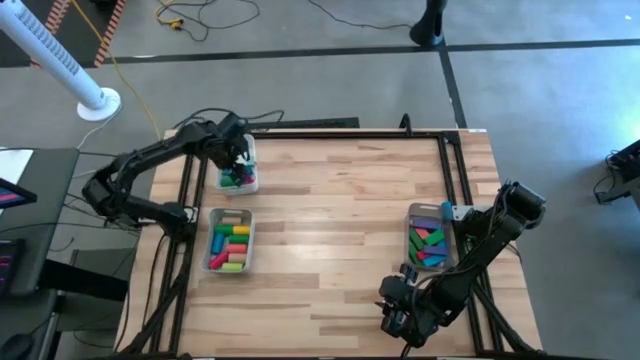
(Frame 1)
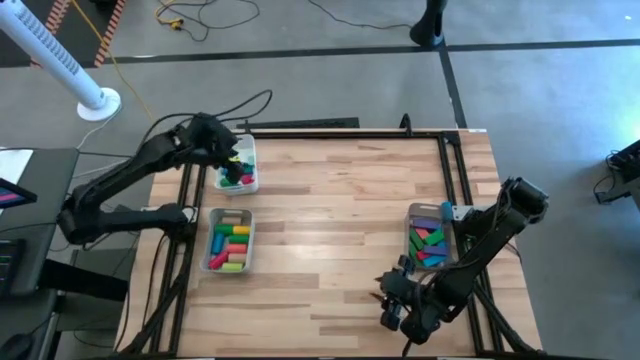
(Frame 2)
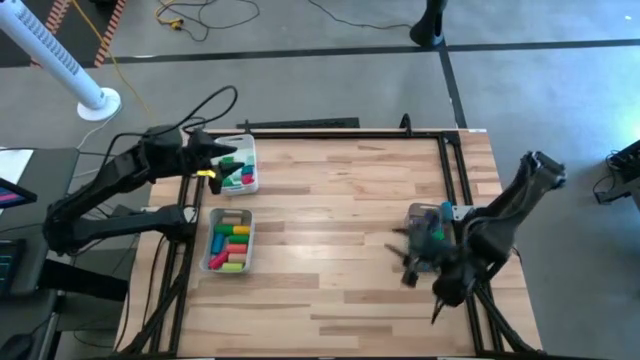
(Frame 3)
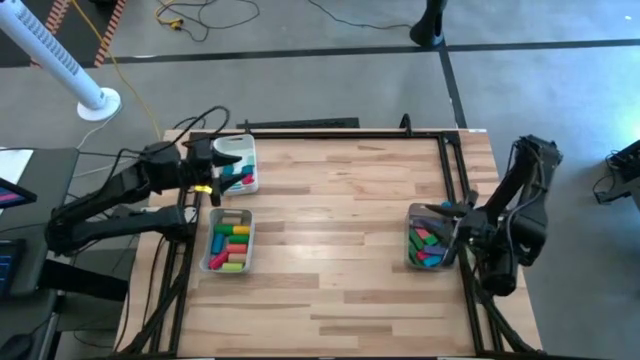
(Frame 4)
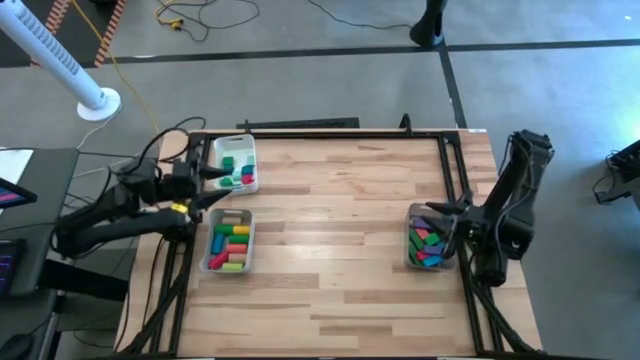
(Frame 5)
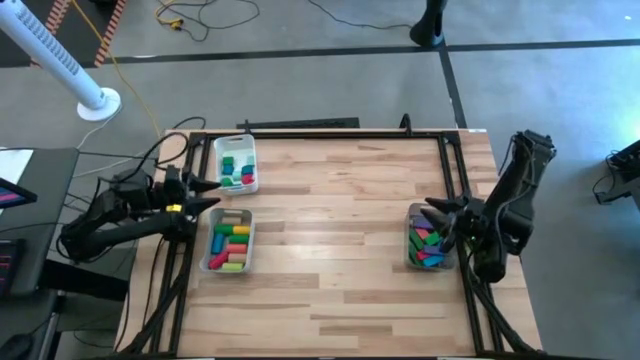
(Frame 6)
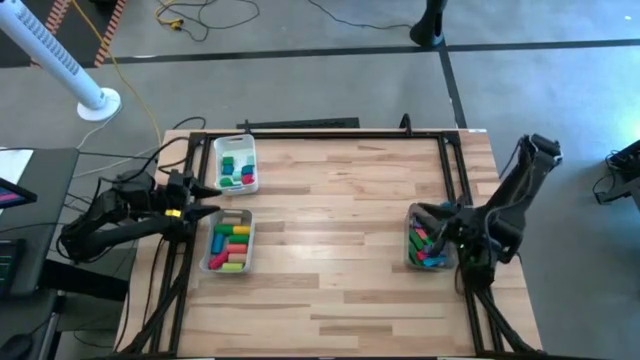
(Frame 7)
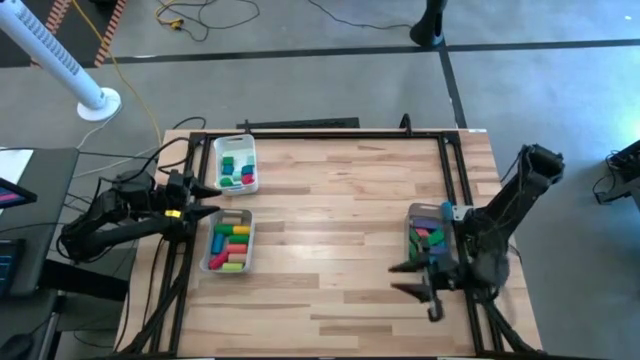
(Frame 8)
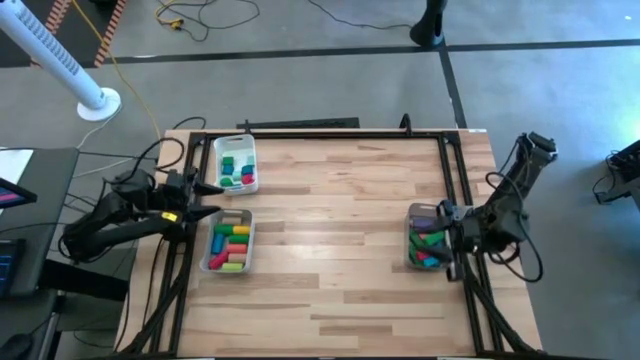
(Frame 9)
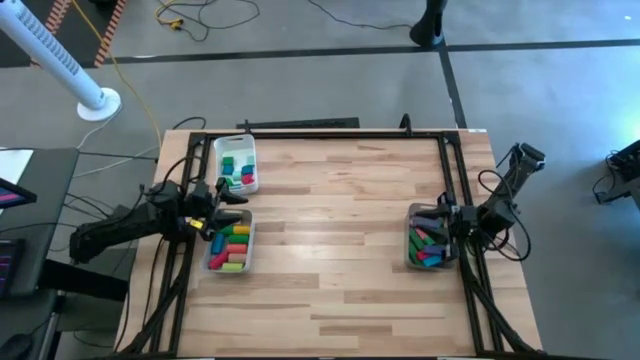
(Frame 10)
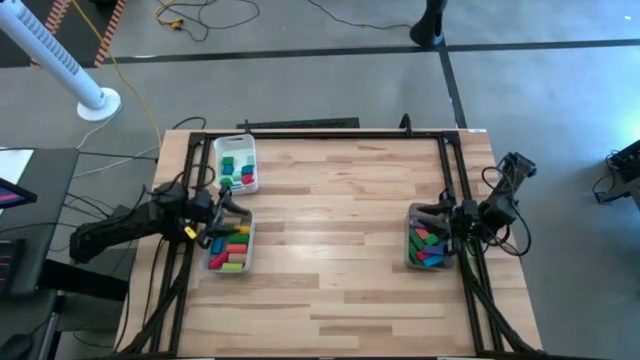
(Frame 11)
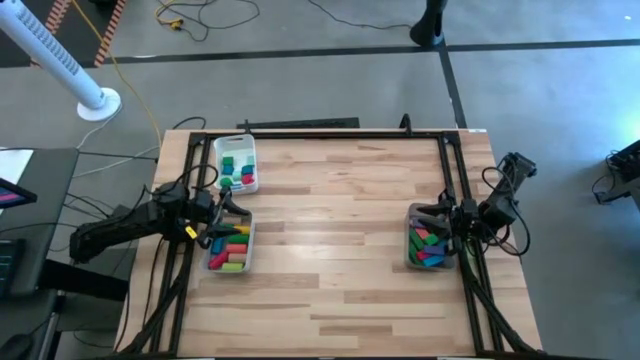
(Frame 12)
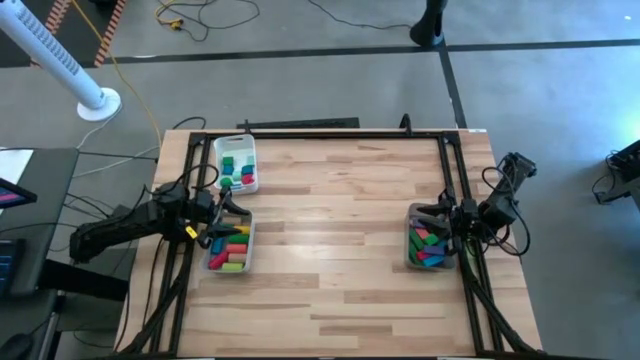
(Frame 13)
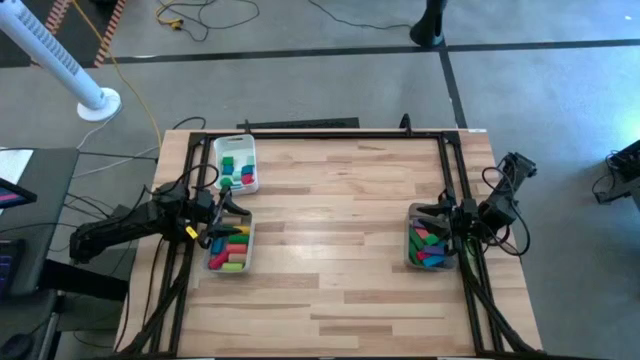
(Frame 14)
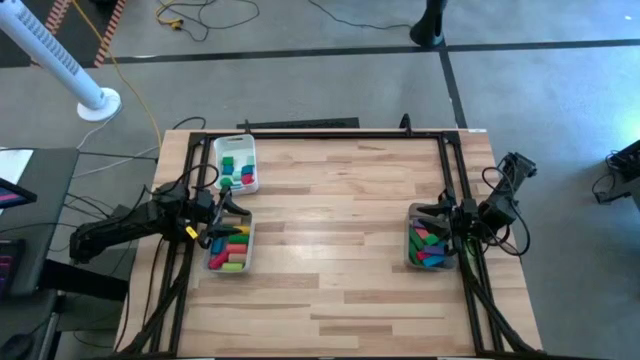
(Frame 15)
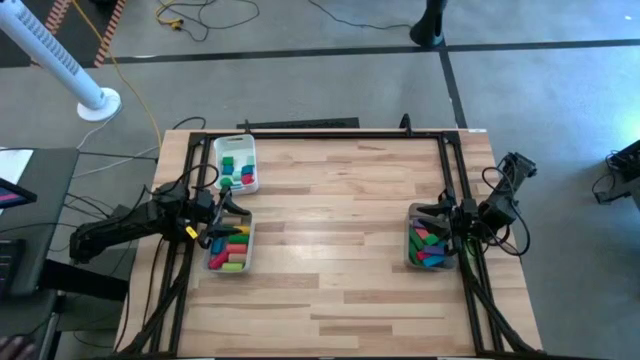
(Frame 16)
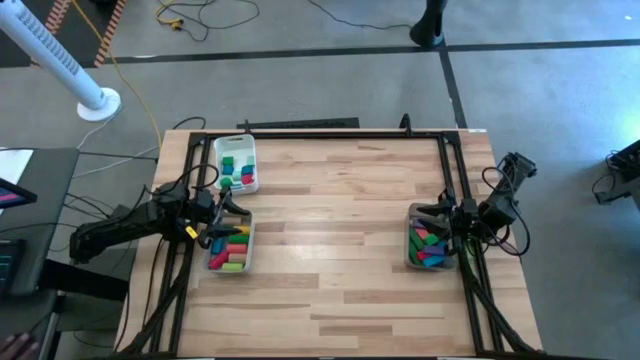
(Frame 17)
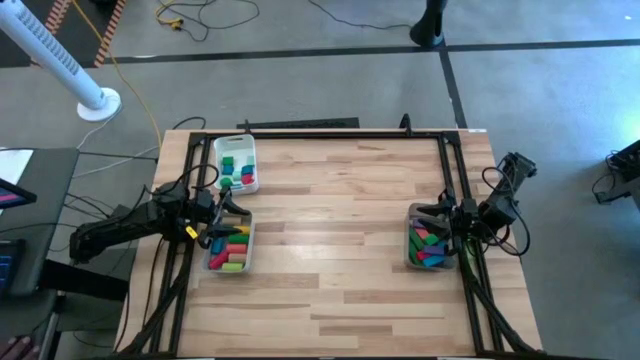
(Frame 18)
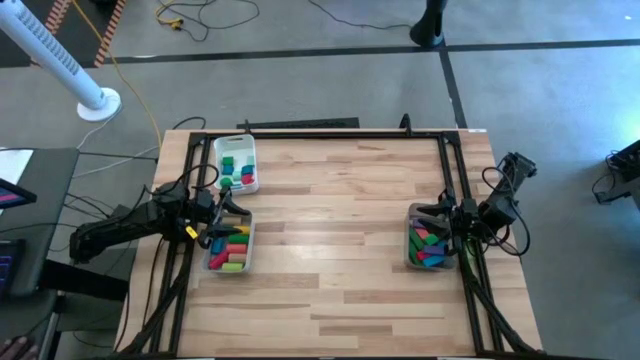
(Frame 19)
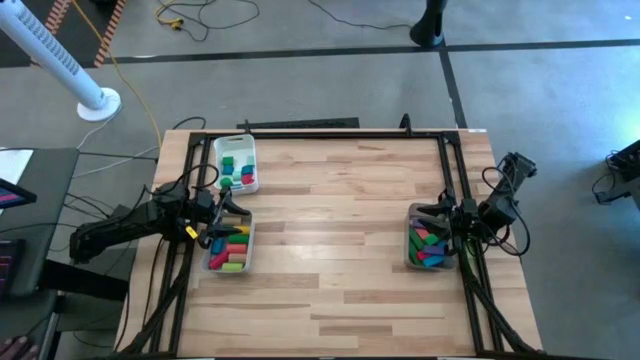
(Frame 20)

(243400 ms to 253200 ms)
Task: Sort blocks by size
Return to Home Position

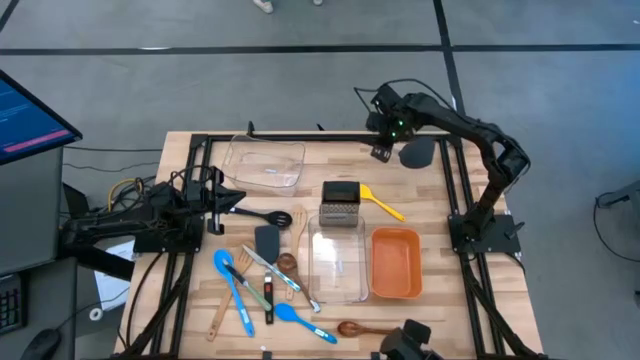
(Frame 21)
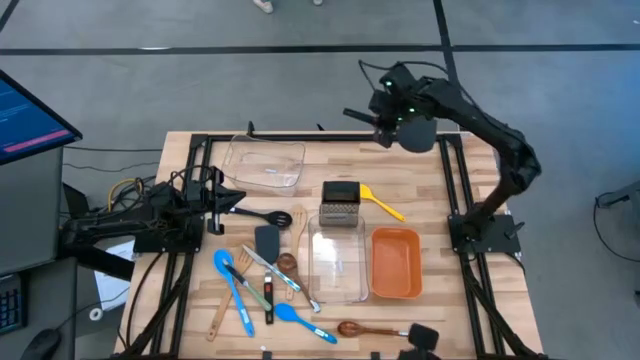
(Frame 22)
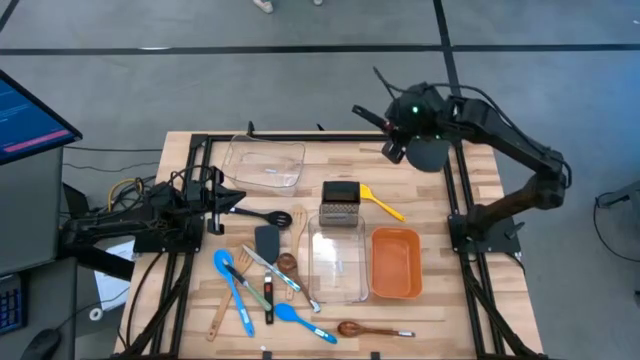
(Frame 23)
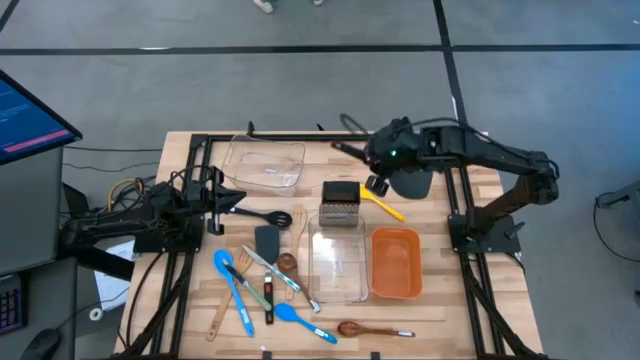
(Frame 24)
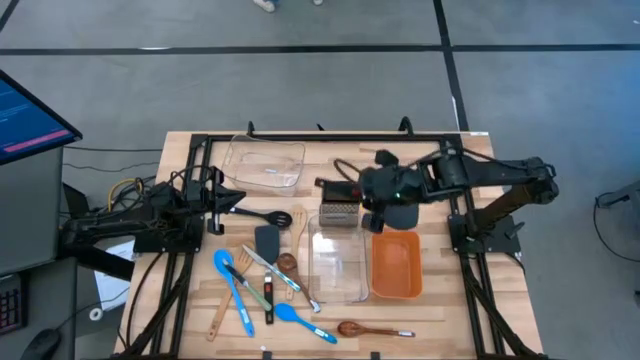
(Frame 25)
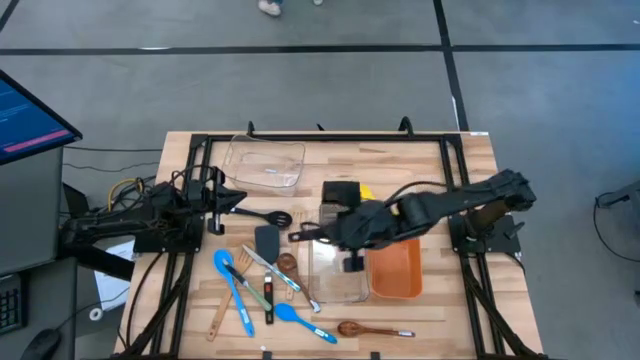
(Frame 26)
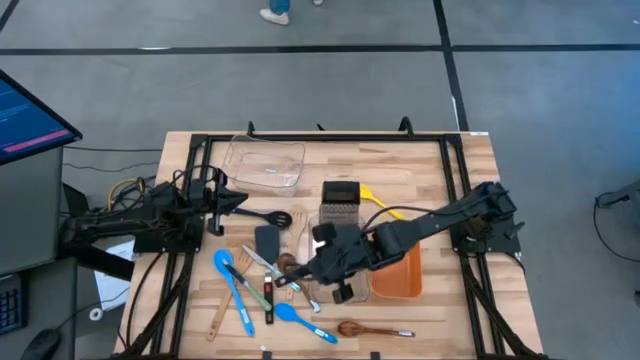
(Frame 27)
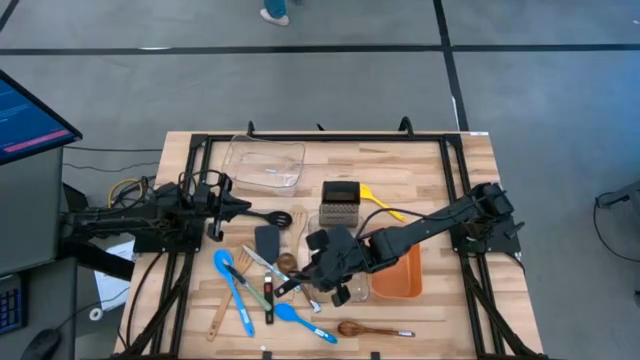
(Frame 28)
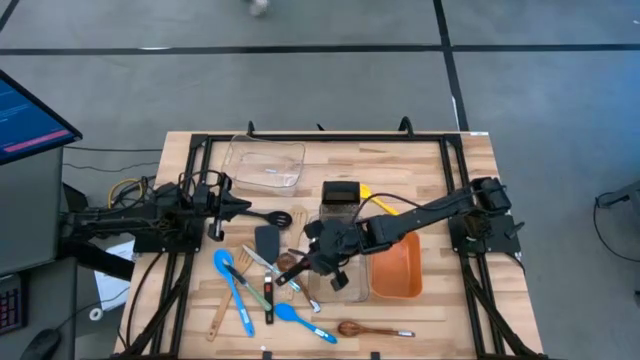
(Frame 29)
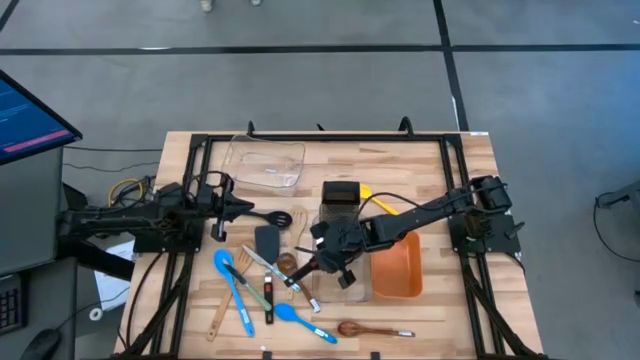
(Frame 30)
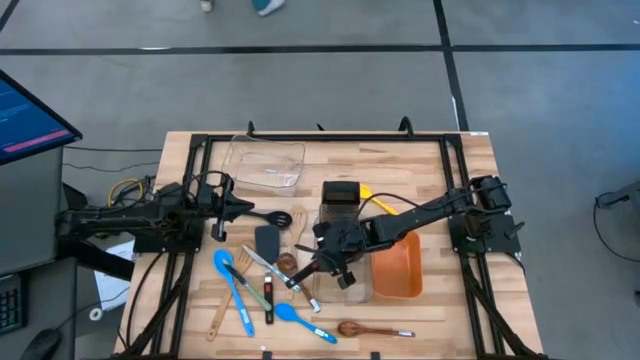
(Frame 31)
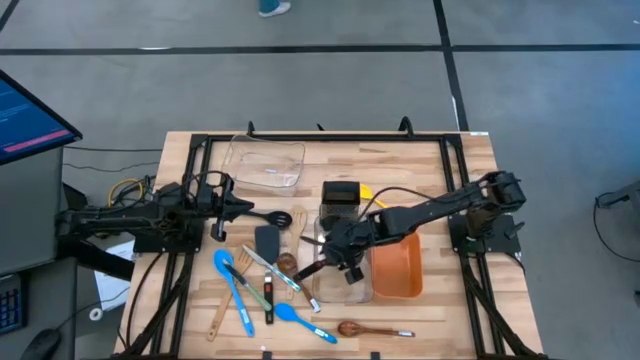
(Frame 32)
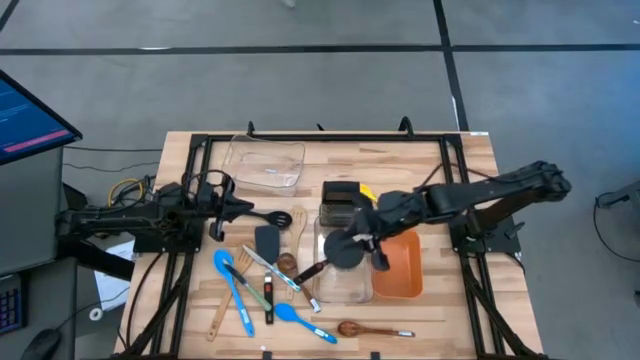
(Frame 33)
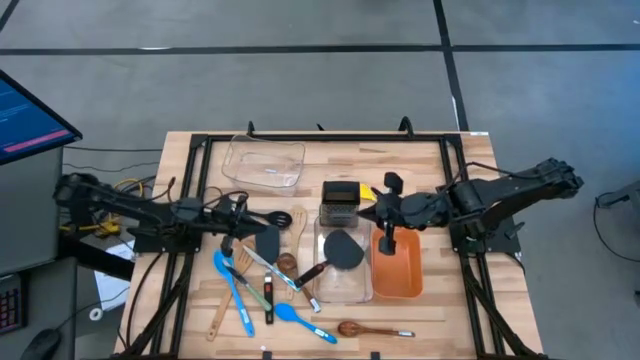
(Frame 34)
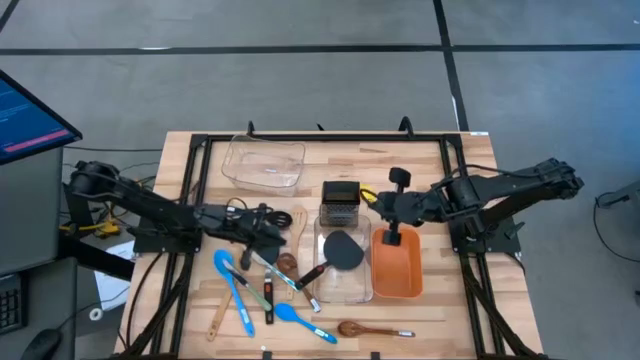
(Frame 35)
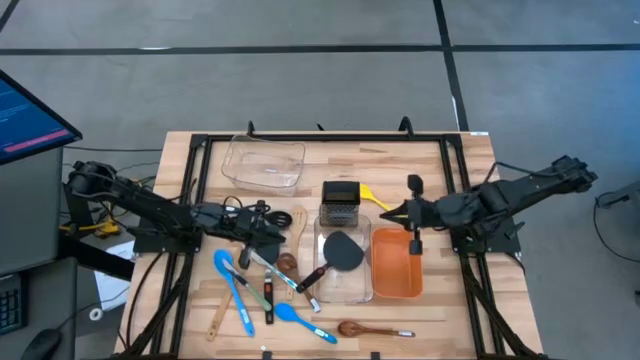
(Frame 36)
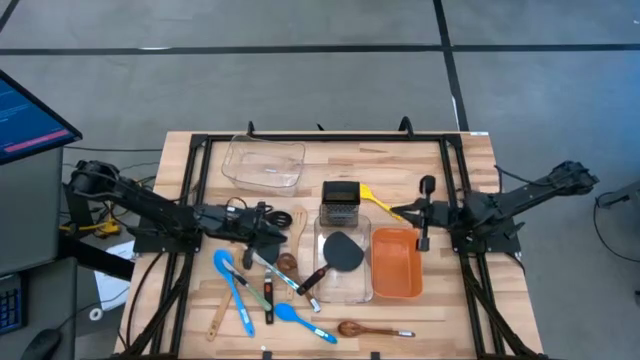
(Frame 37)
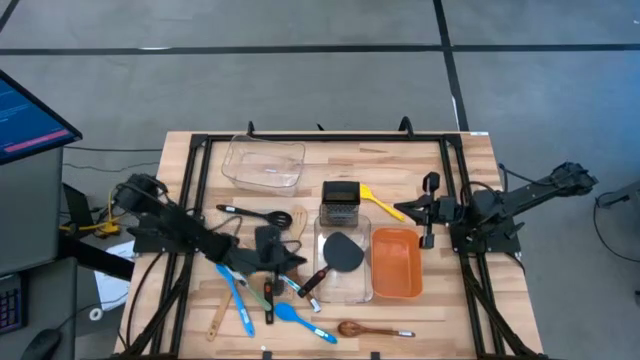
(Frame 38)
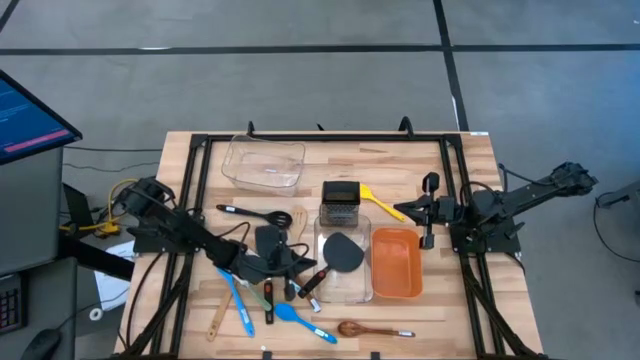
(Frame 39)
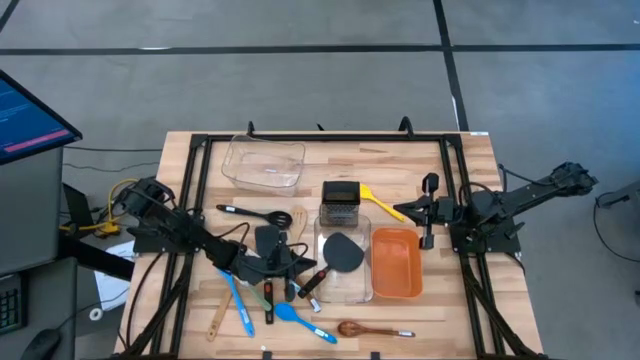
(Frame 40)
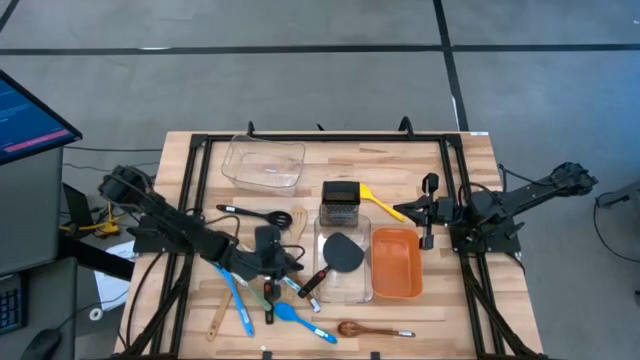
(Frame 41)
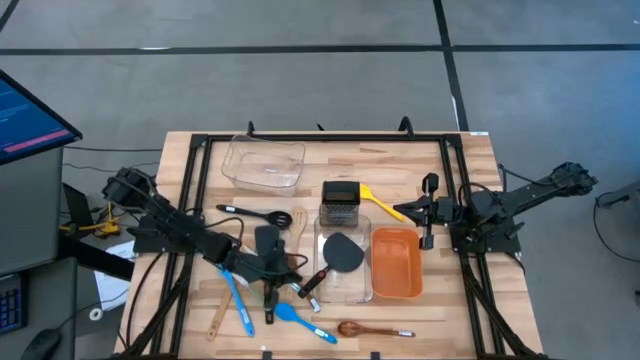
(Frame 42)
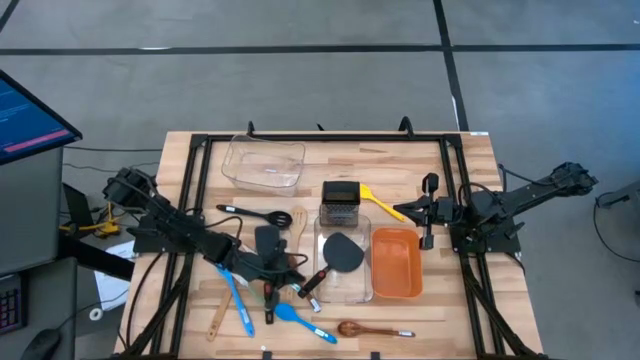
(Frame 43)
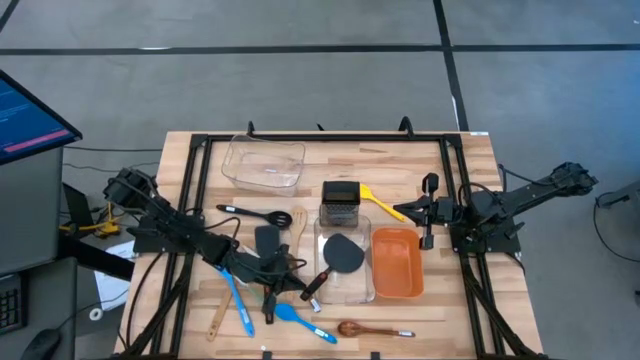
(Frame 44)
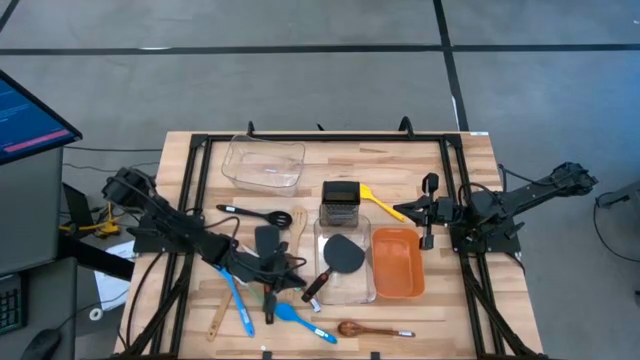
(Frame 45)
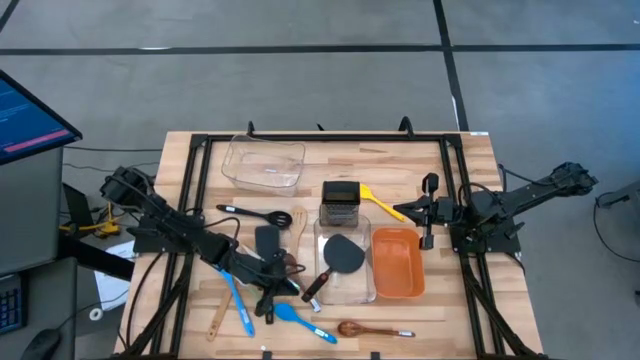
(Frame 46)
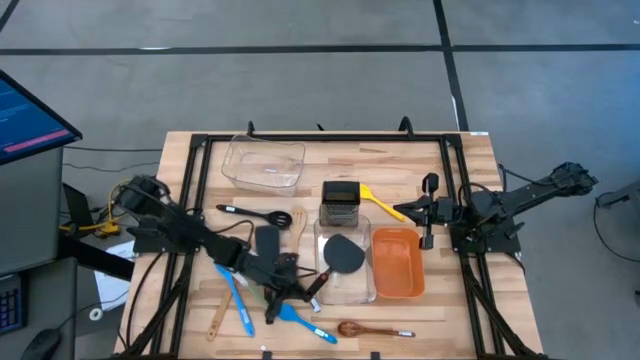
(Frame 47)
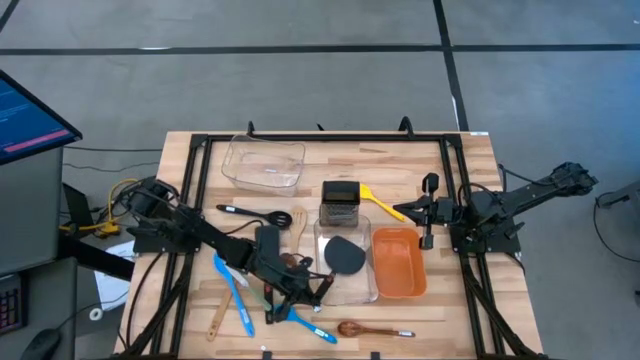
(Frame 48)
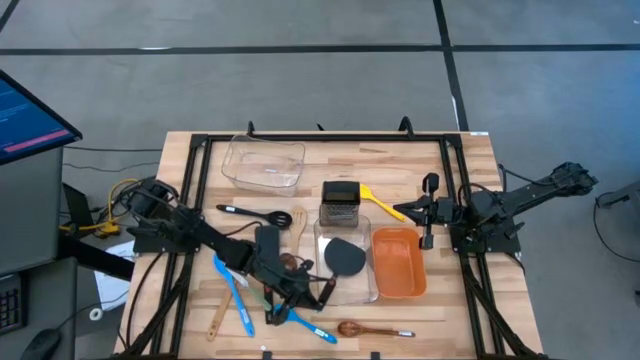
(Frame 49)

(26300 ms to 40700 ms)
Task: Pick & Place Kitchen Items
Put the top black spatula into the bottom transparent bin
